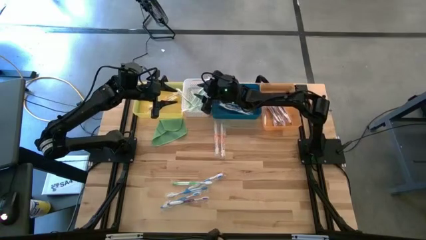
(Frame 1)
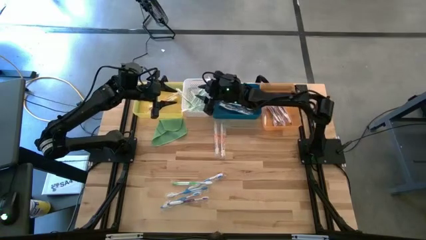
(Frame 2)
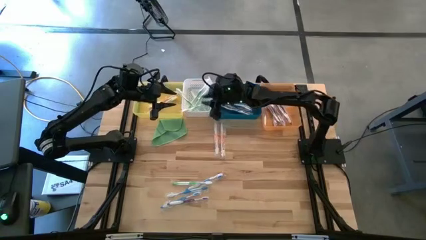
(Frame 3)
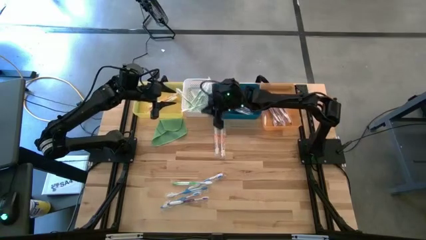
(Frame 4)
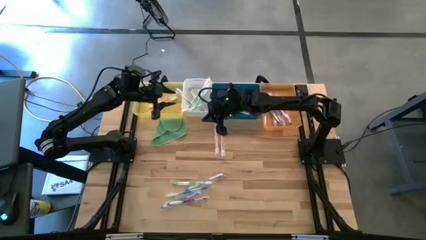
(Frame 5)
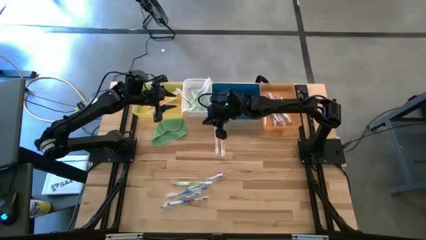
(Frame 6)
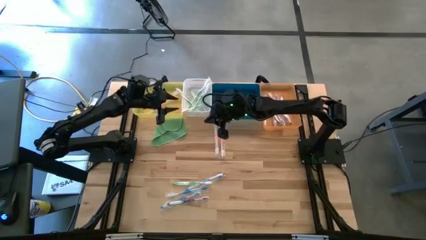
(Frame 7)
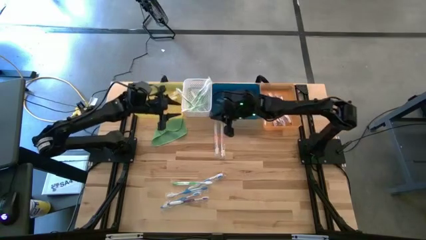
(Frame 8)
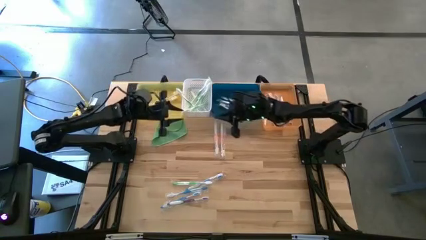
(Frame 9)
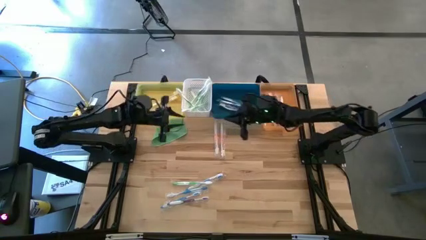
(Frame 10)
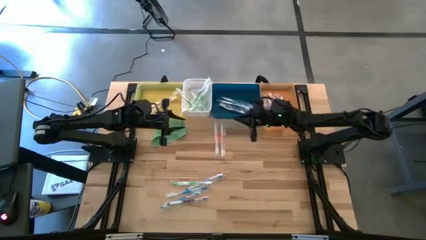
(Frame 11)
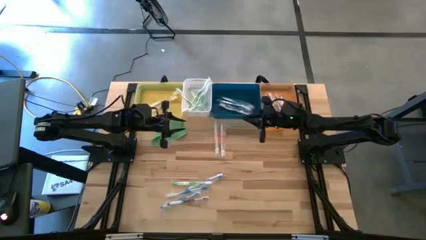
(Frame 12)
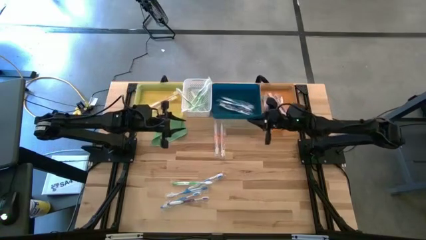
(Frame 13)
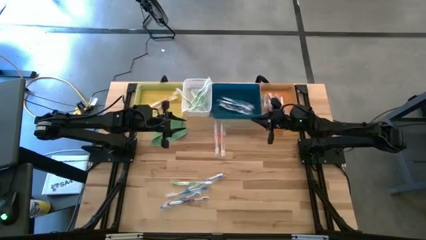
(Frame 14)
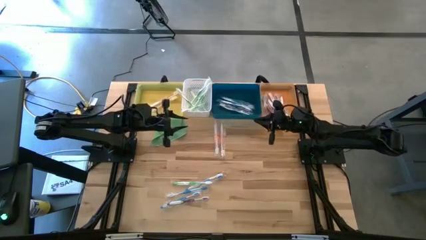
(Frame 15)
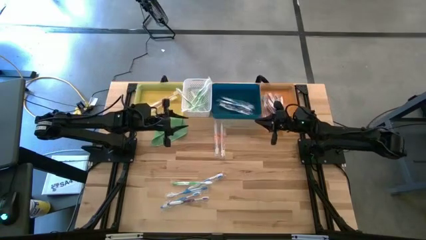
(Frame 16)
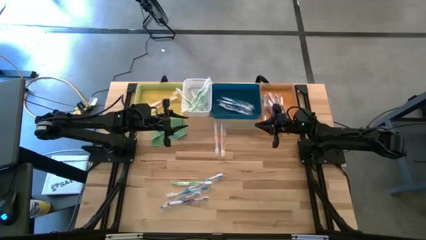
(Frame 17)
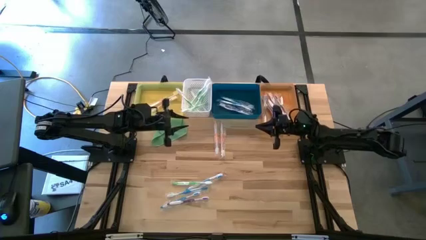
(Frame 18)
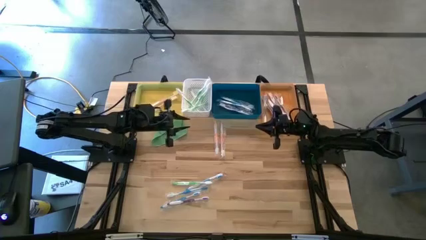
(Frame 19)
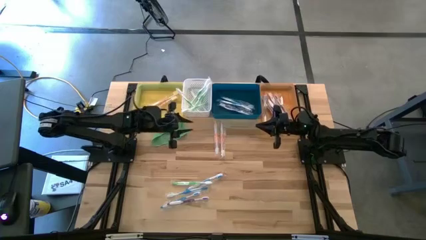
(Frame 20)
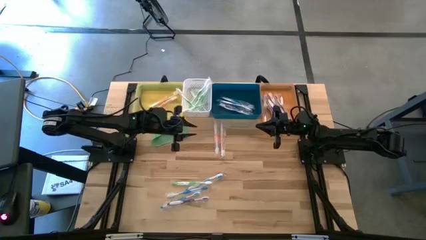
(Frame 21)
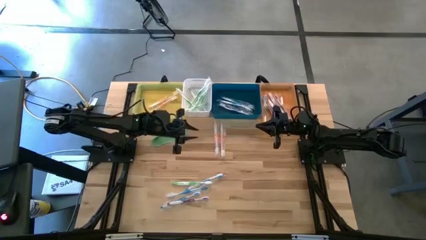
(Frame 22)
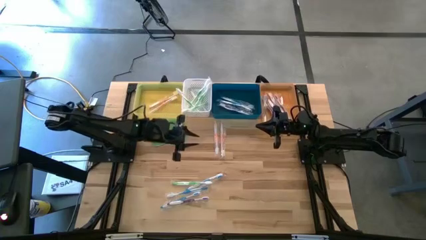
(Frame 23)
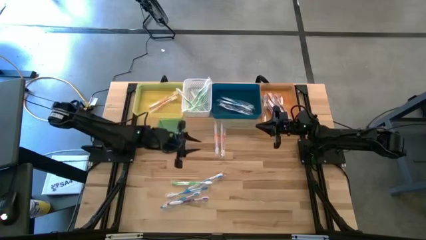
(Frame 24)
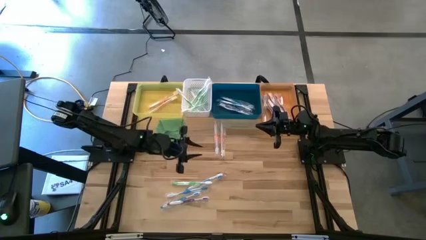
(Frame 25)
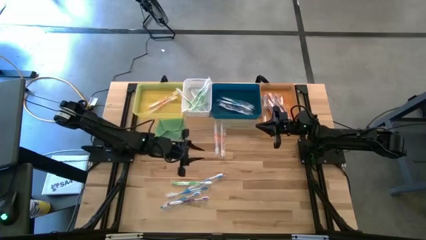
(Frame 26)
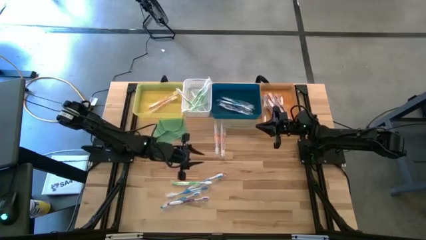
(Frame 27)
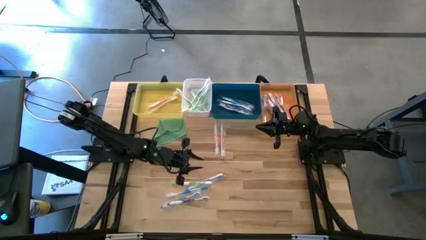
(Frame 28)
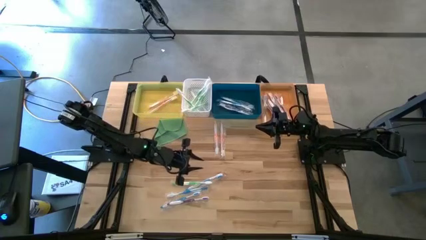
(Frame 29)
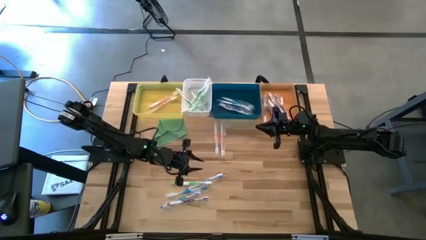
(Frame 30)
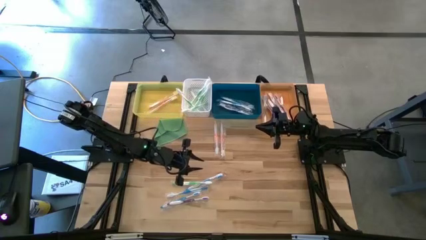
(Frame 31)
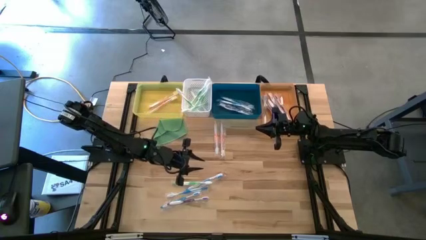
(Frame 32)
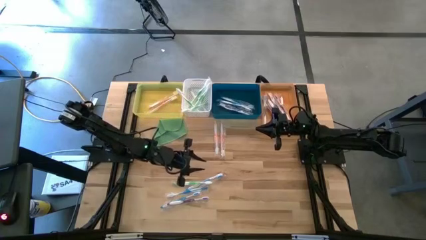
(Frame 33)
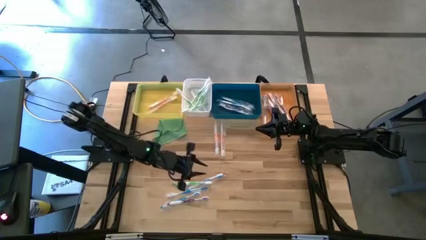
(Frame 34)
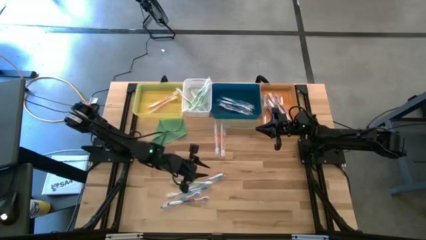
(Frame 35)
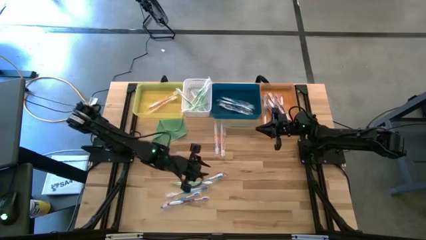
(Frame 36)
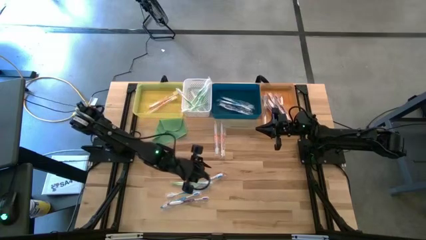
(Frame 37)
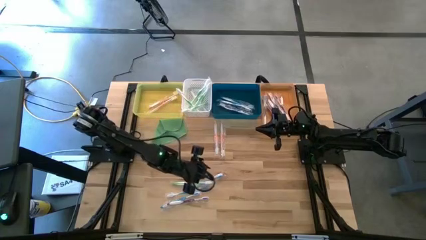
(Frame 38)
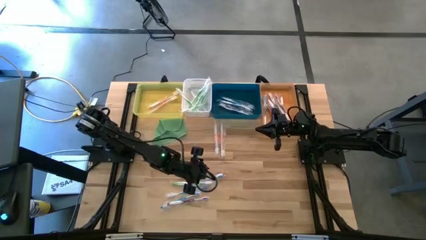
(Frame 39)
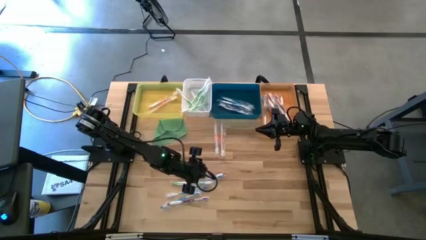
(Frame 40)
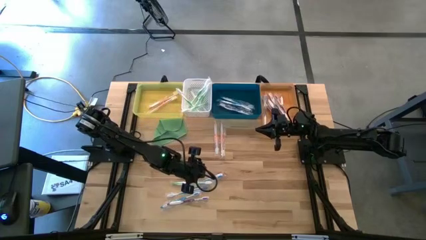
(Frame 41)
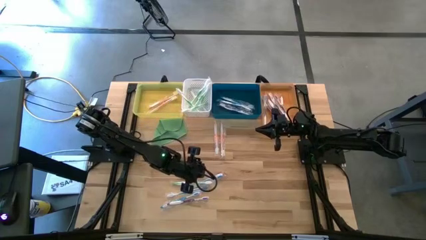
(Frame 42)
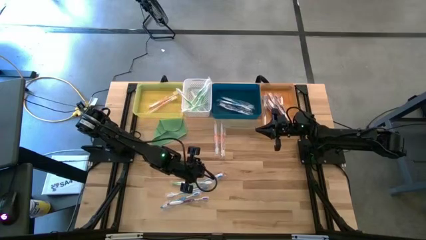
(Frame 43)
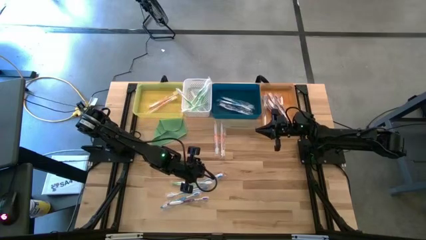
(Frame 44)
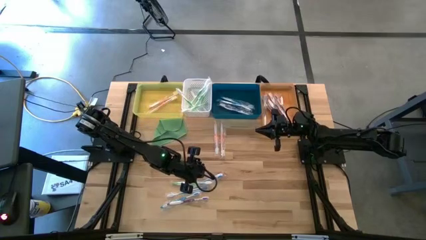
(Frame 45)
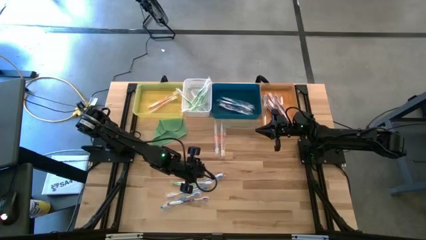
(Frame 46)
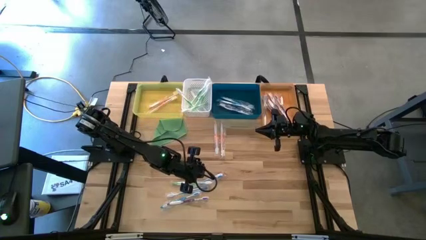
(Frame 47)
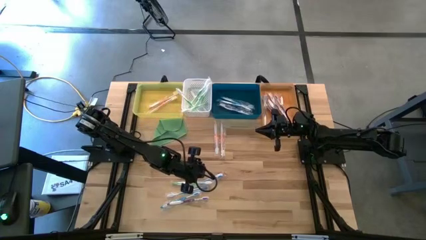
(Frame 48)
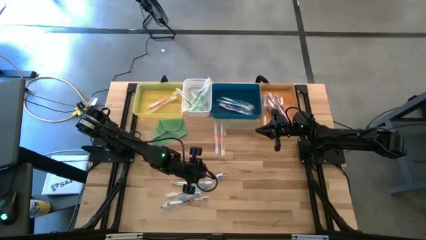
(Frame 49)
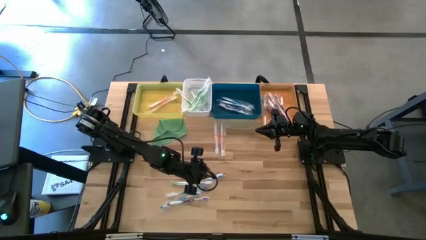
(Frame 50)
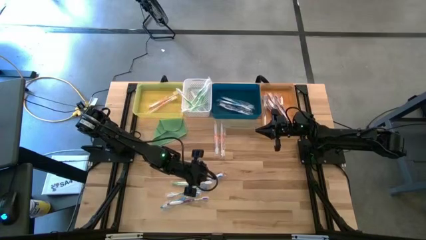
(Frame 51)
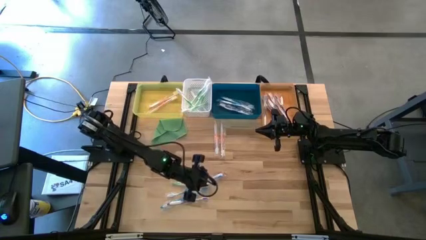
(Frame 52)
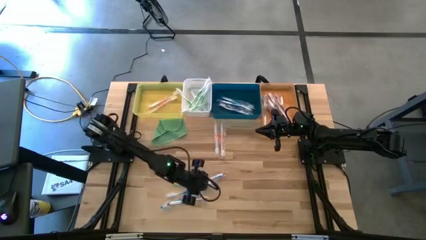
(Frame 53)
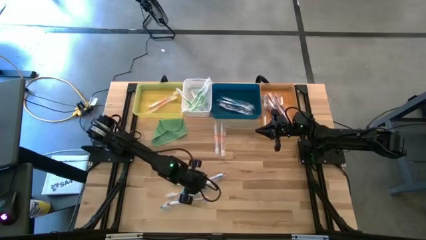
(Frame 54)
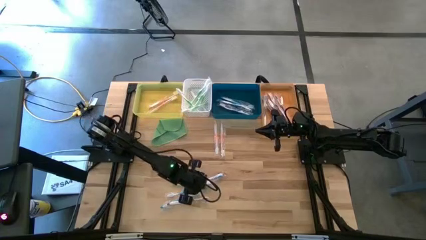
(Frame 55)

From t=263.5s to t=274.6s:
Task: Pick & Place Toothbrushes
Put the green toothbrush into the white bin

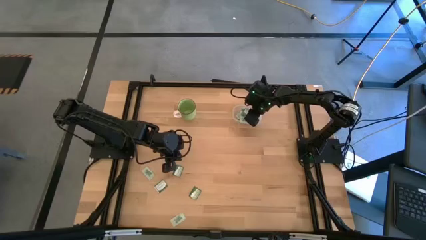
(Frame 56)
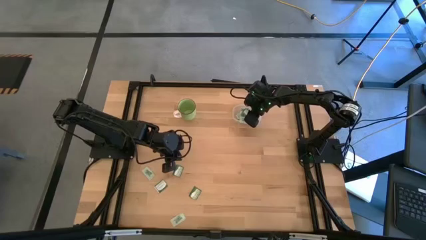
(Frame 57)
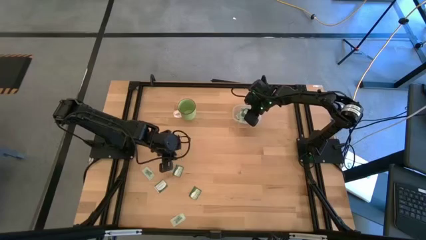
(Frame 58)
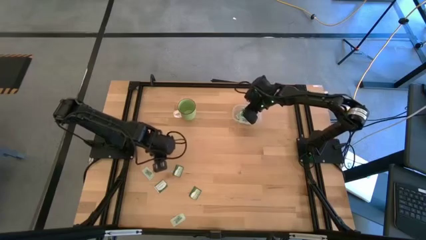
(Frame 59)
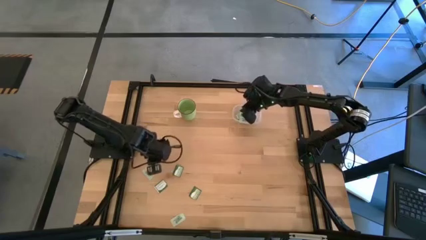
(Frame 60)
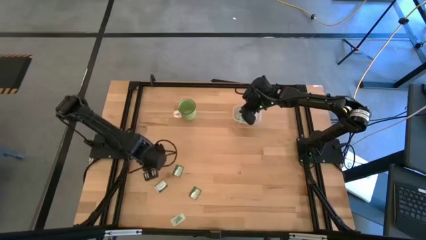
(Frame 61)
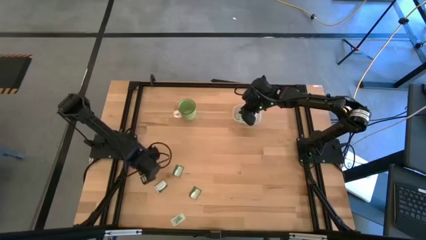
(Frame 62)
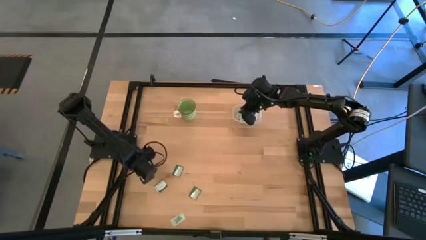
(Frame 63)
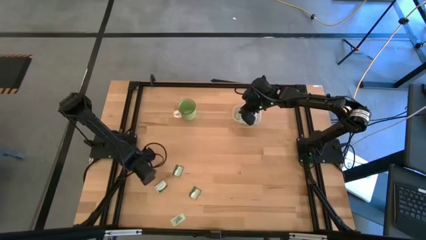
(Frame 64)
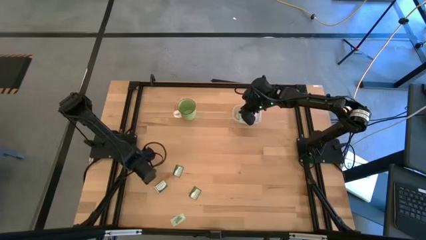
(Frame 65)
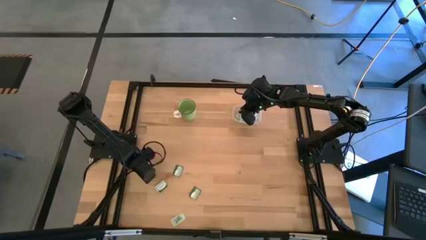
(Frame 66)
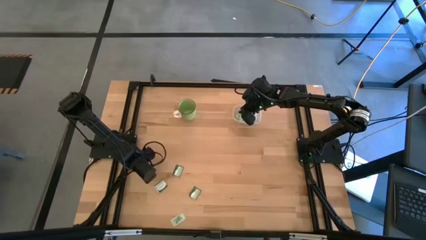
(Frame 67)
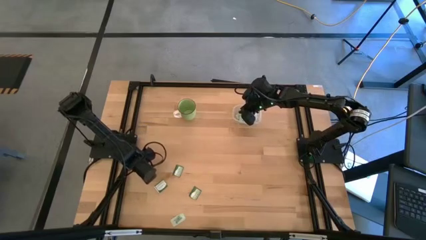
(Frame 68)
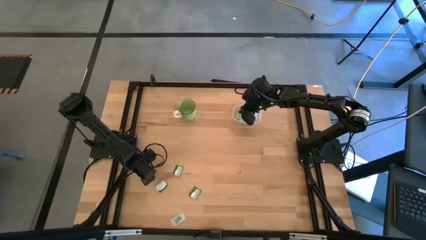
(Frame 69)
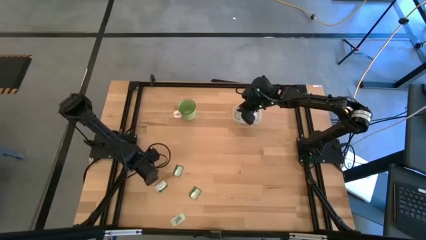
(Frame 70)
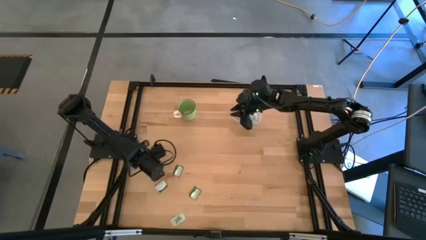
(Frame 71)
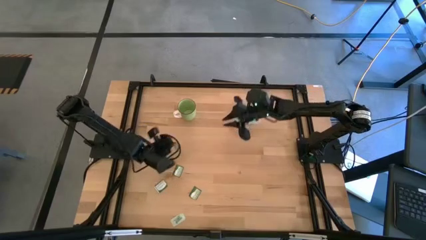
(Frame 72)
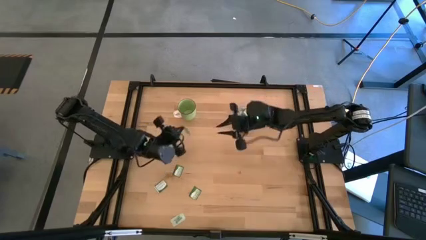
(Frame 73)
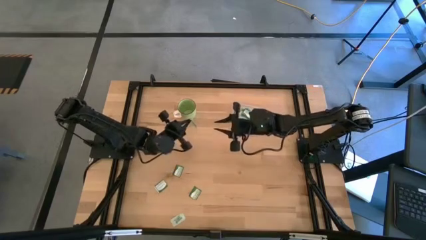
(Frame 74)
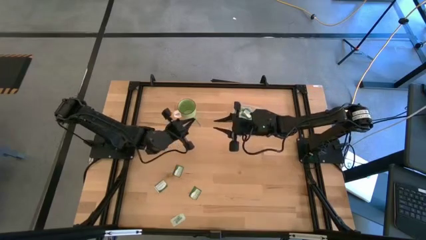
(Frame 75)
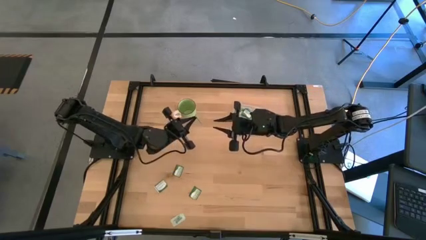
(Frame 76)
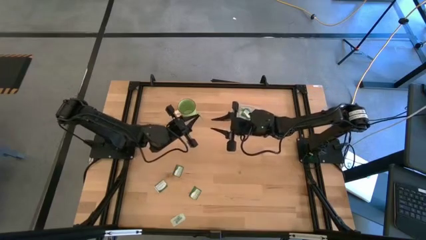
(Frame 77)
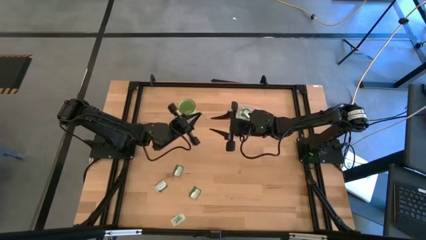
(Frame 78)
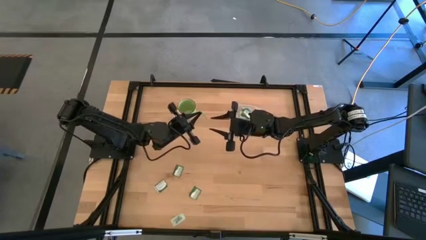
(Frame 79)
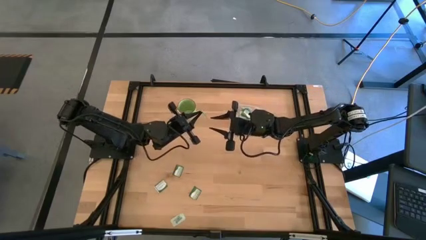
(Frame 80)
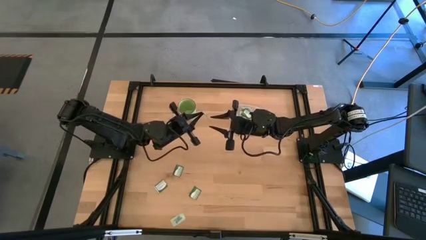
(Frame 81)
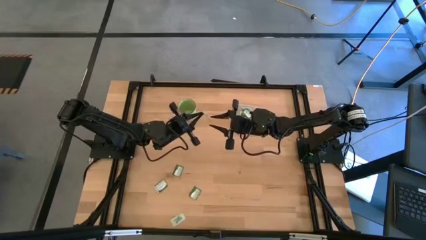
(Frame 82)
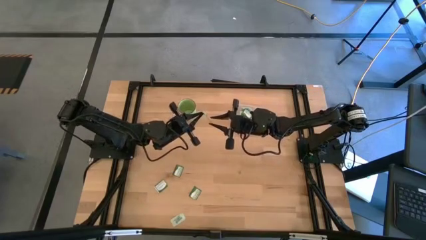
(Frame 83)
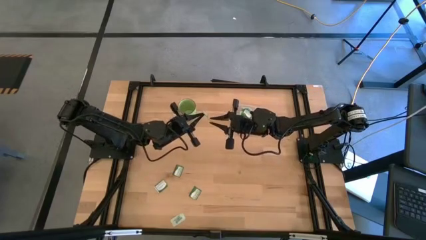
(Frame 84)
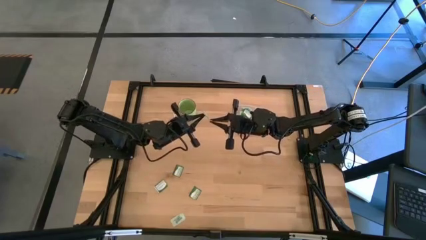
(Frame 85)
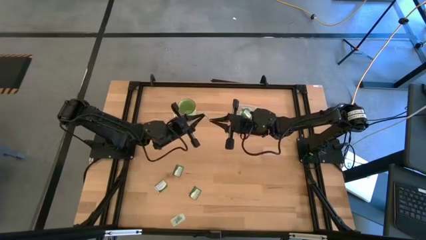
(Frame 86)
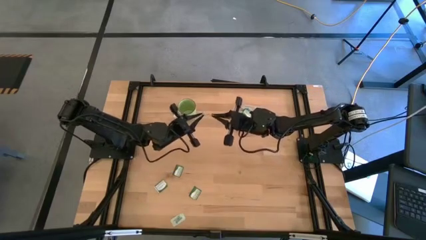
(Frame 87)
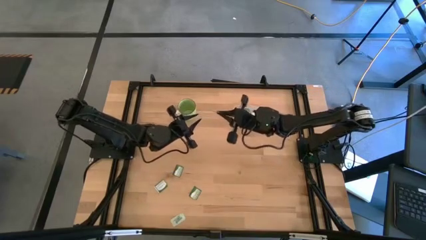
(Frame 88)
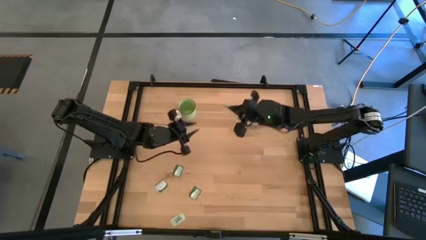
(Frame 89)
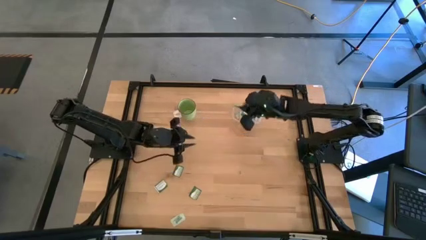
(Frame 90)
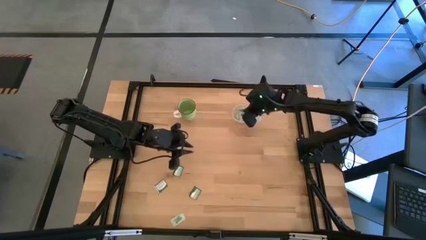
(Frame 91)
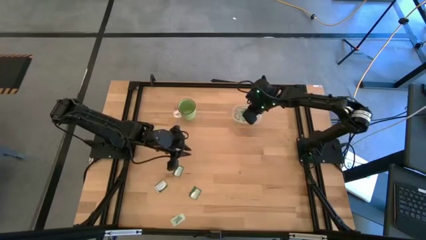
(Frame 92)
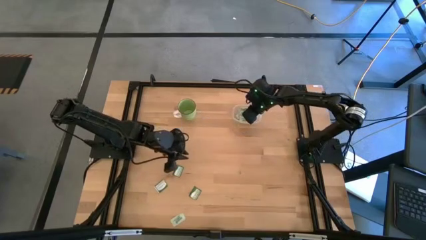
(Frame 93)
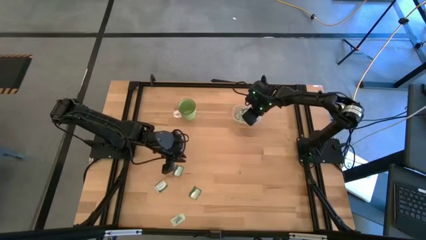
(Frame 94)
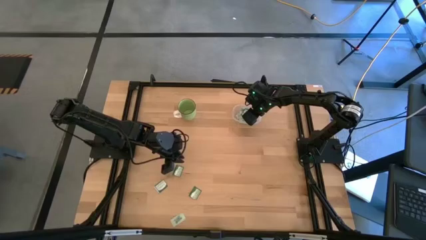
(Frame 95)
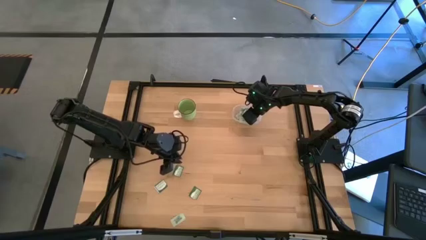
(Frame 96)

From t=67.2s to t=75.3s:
Task: Pick and place items into bin
Put the white stevia packet into the transparent bin
